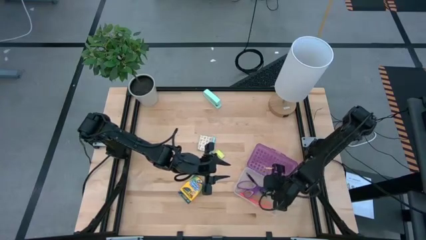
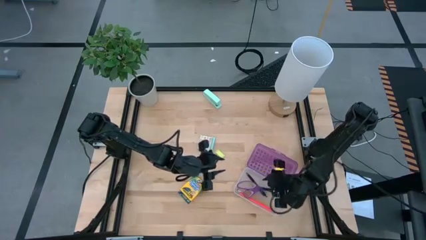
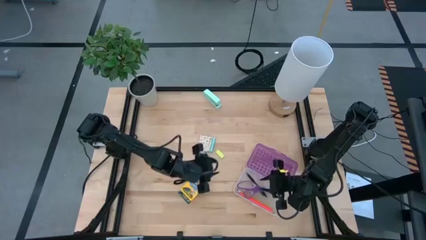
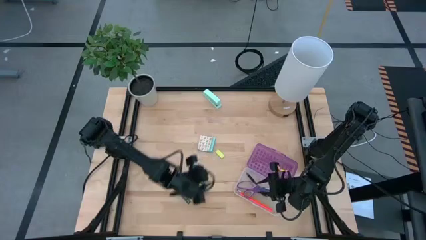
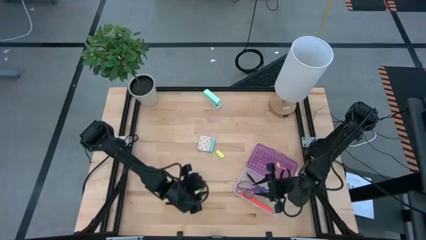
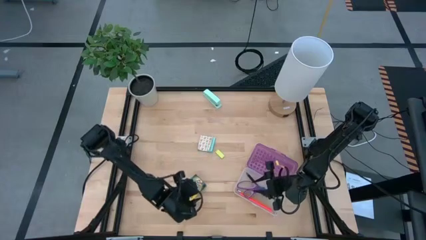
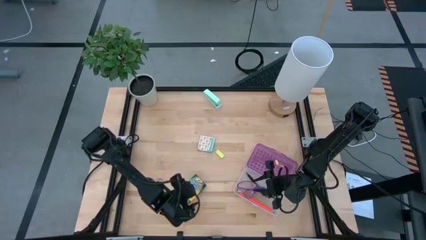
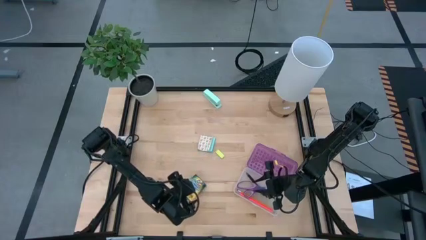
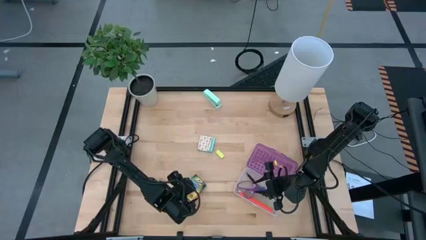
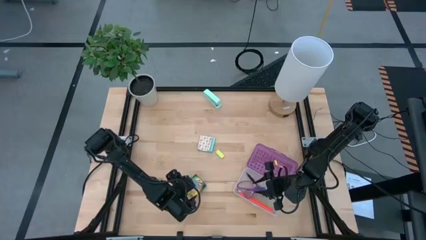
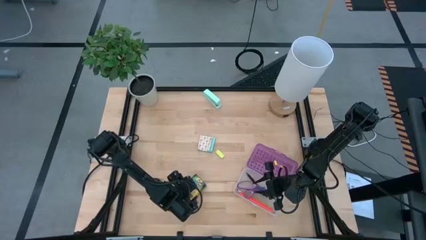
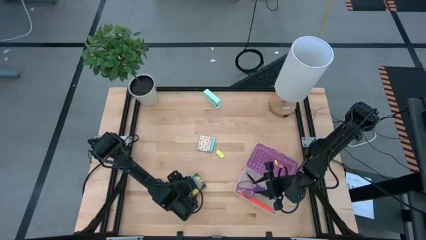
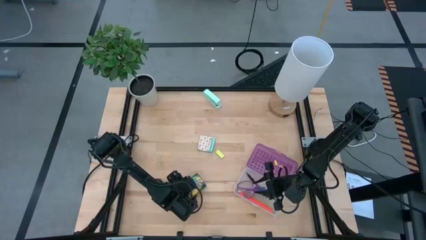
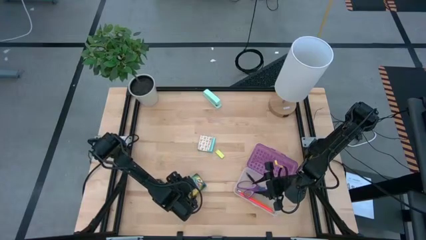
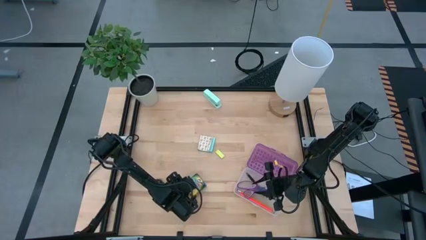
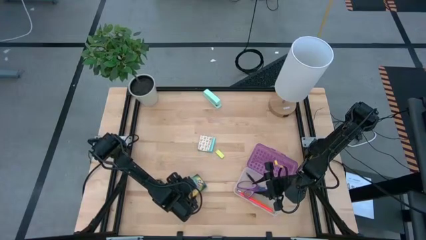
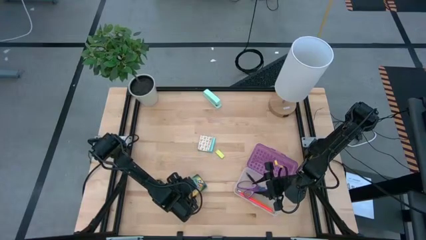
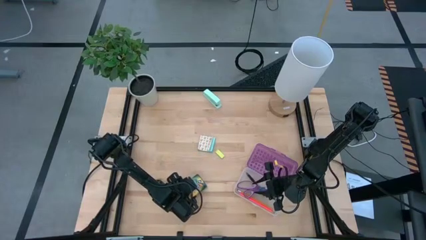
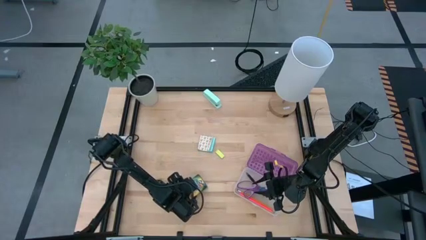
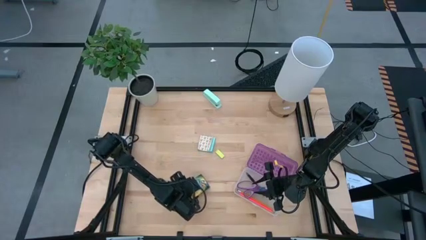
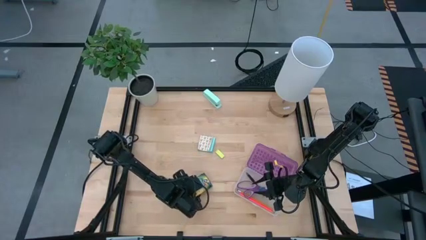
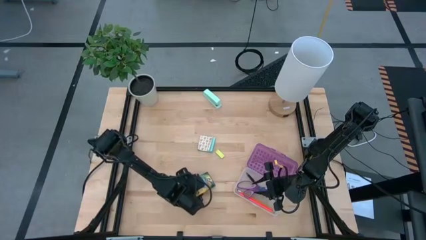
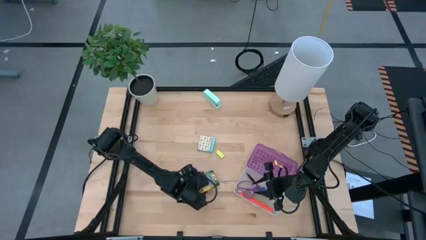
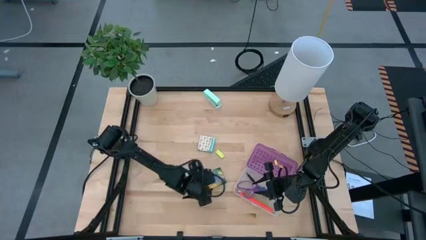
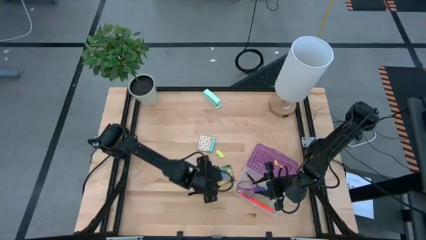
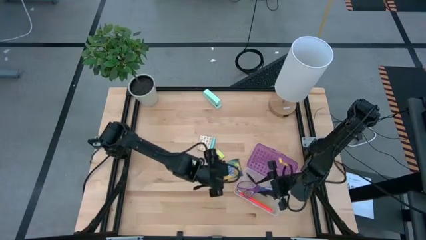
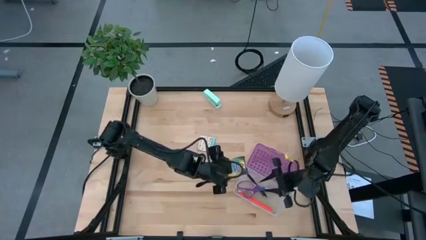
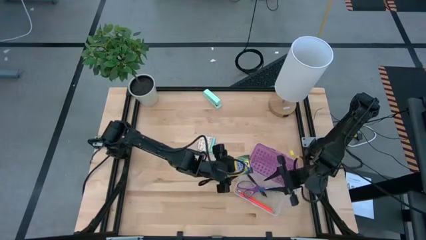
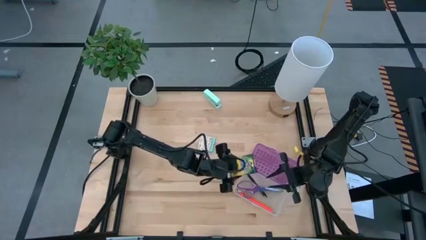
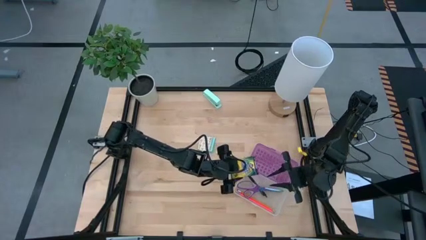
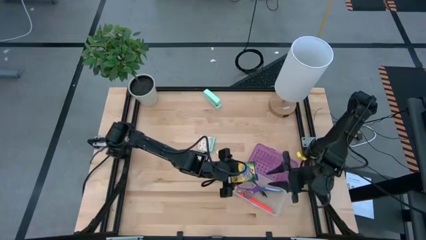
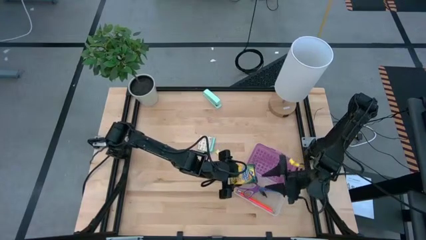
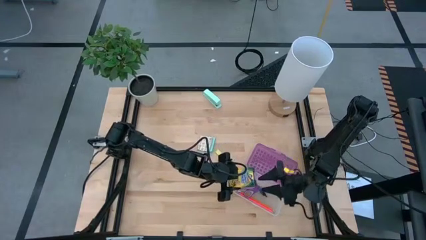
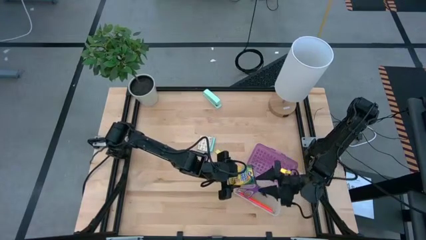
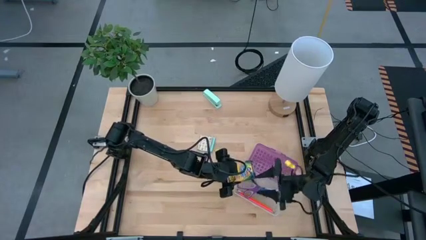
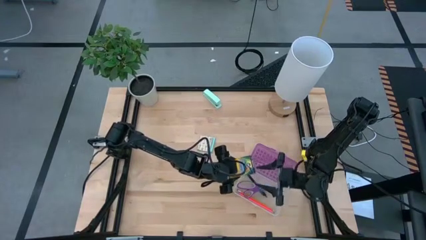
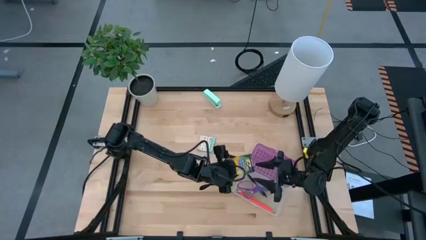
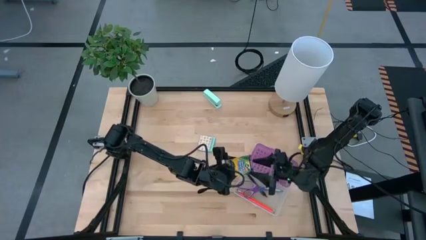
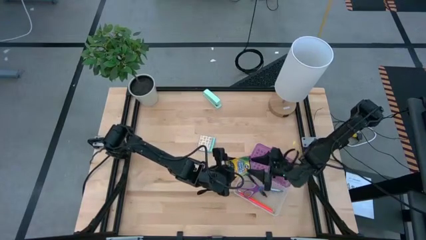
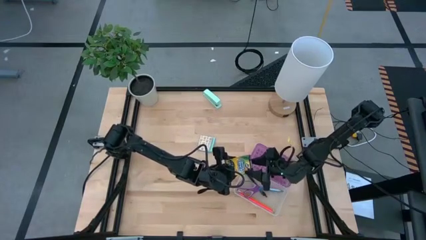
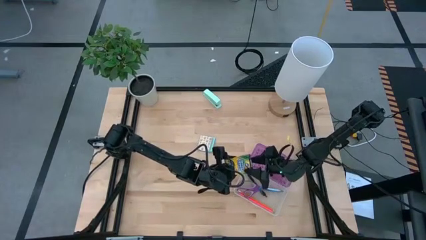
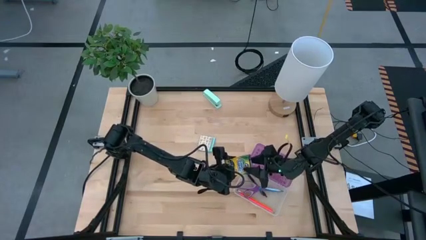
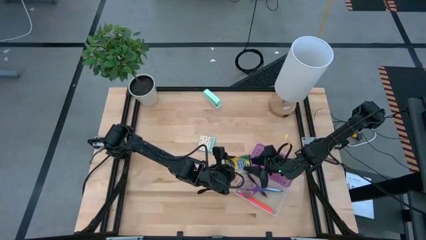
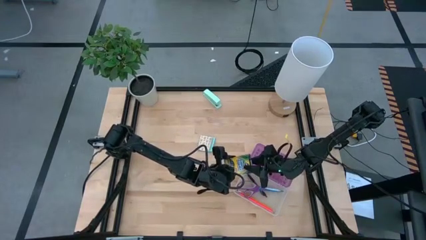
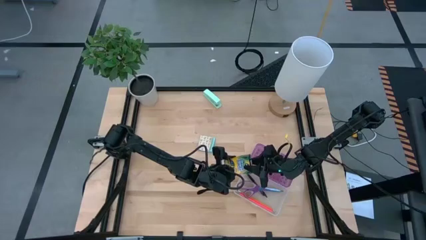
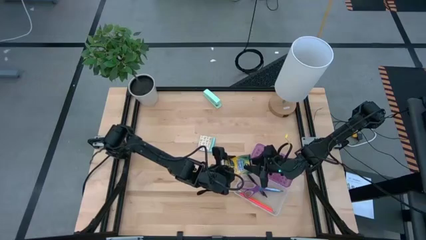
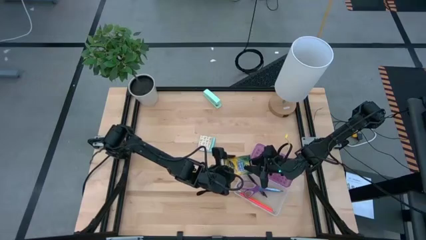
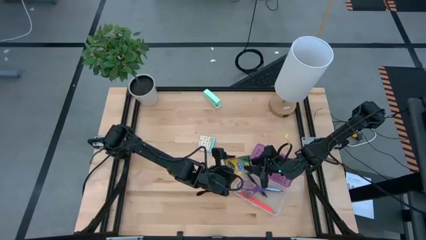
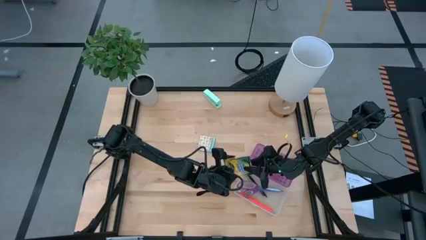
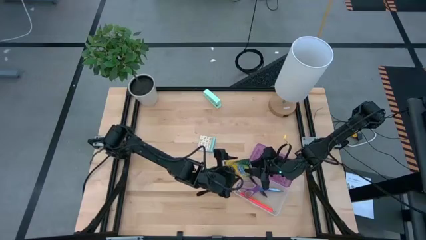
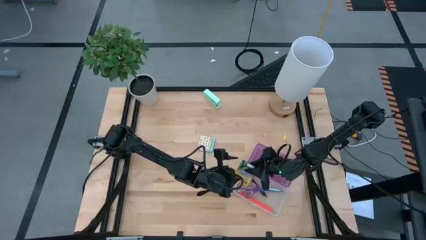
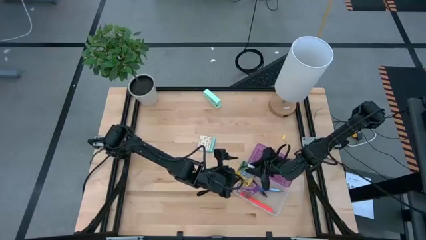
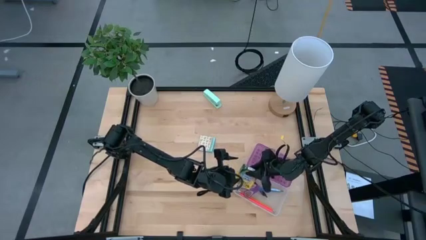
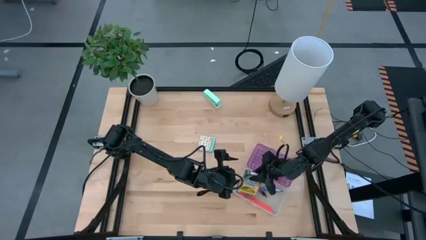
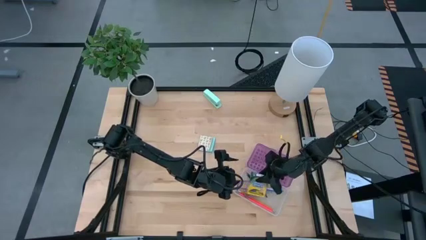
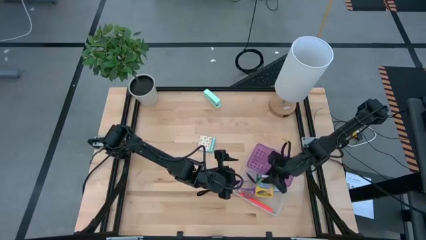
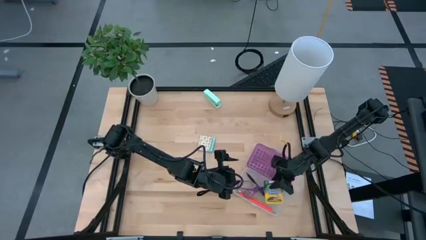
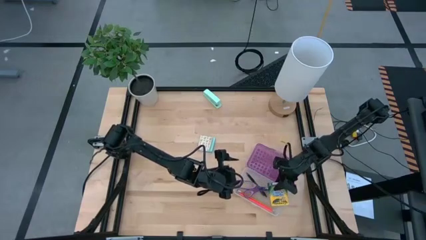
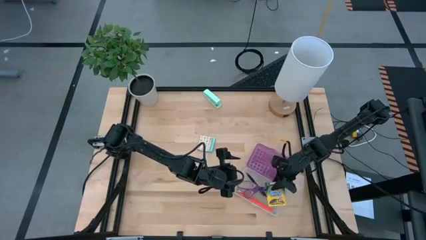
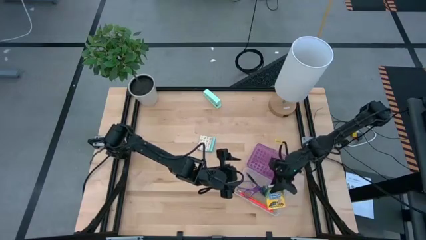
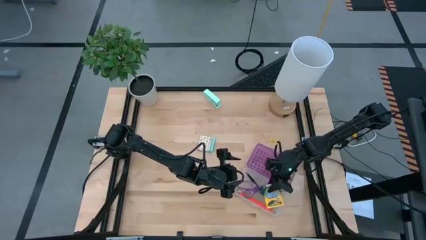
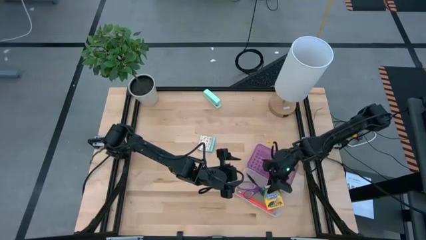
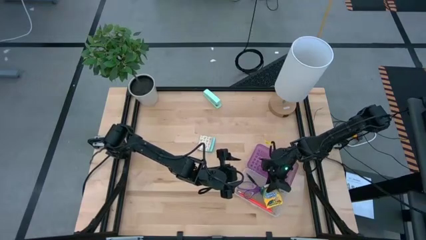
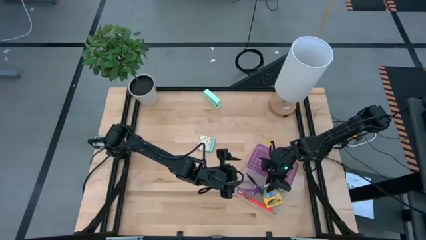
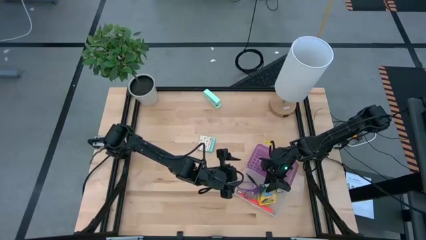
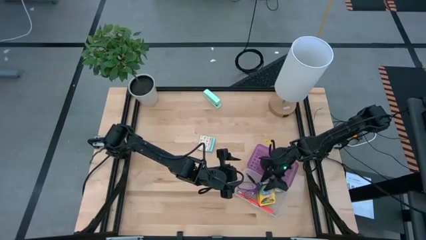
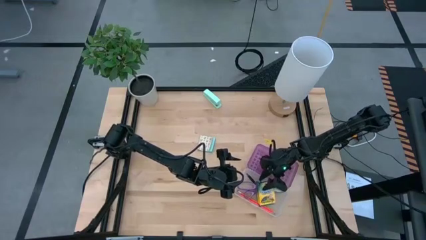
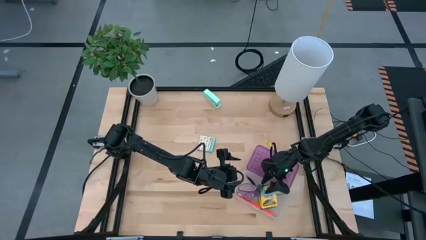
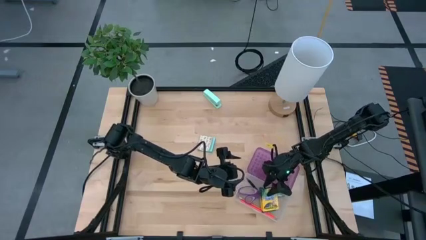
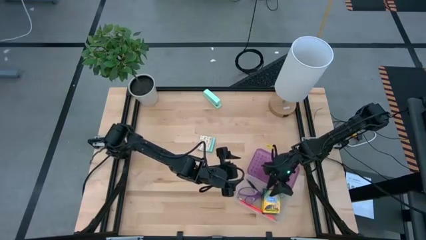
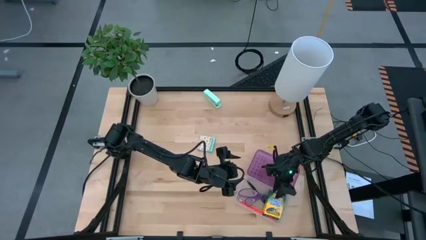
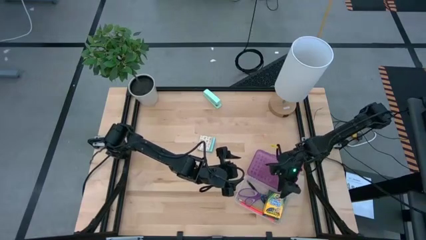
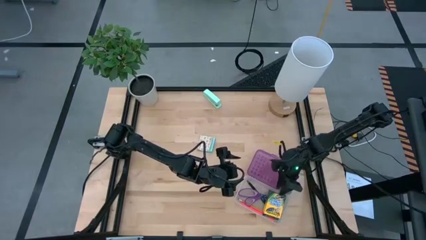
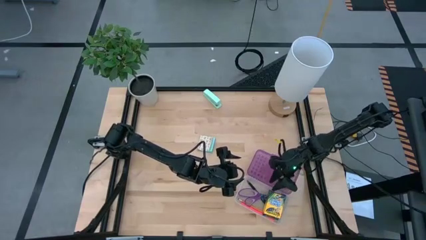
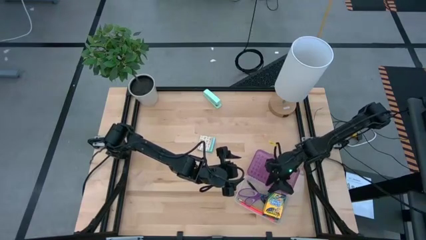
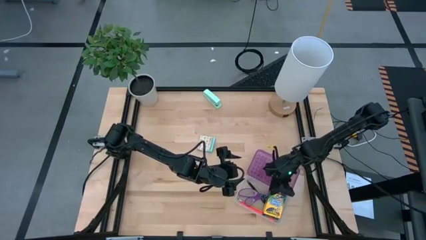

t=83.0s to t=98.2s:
Task: Pack school essentials
Put the yellow crayon box into the violet supply box
